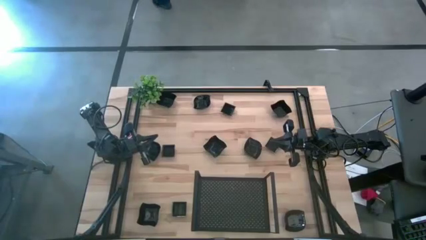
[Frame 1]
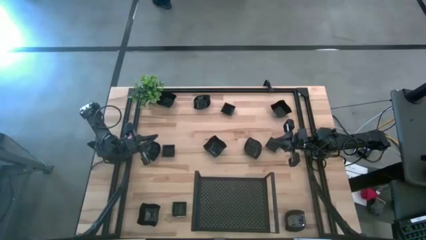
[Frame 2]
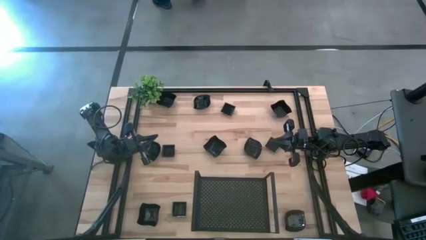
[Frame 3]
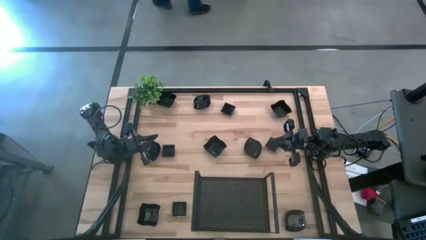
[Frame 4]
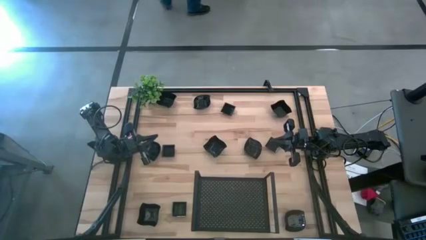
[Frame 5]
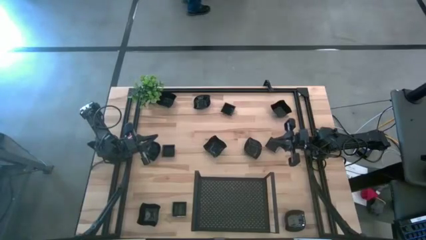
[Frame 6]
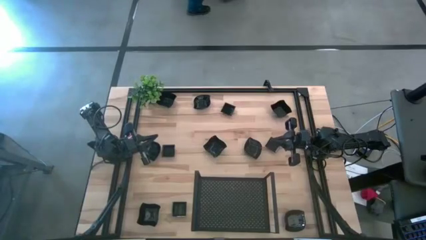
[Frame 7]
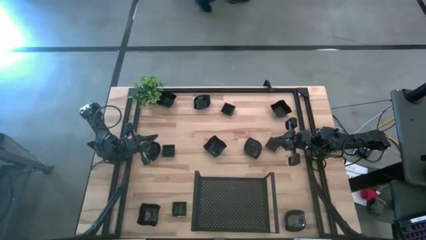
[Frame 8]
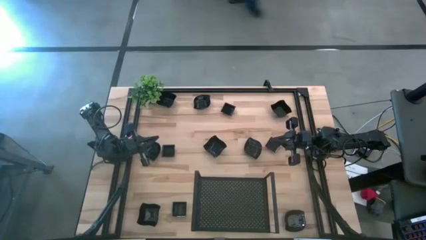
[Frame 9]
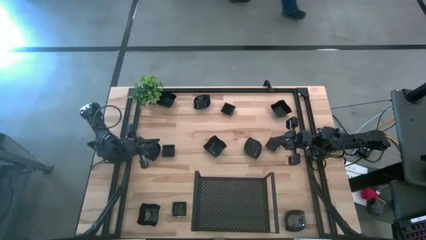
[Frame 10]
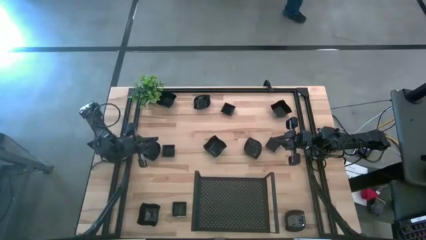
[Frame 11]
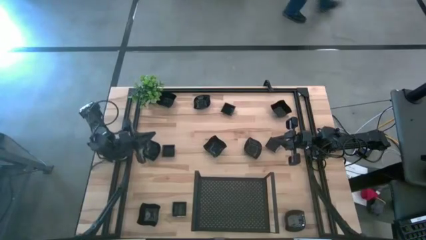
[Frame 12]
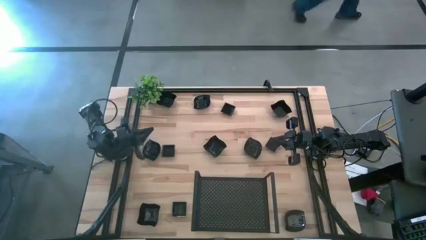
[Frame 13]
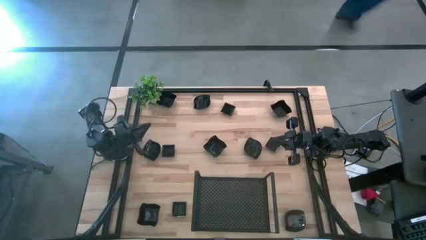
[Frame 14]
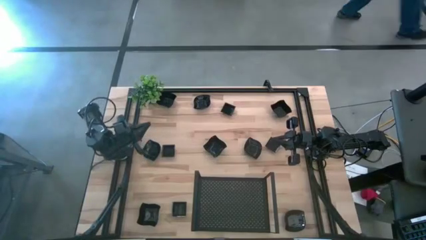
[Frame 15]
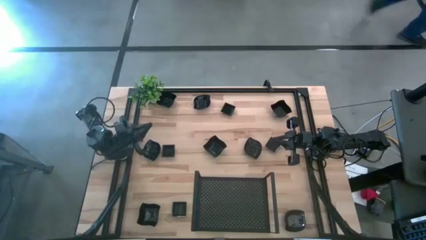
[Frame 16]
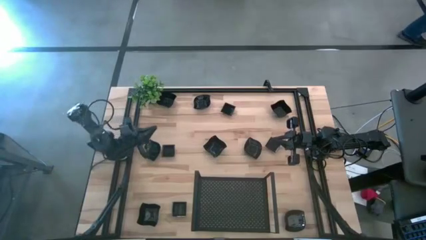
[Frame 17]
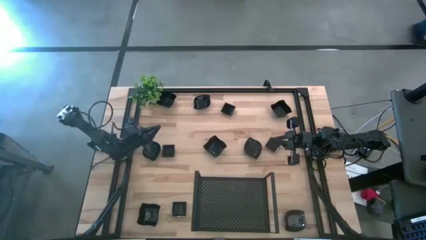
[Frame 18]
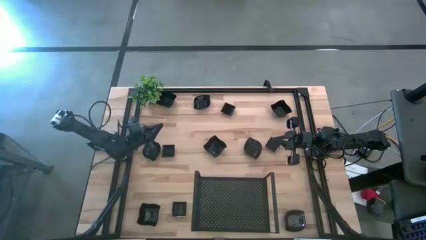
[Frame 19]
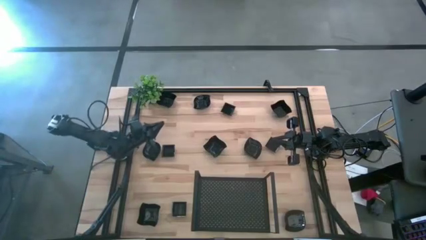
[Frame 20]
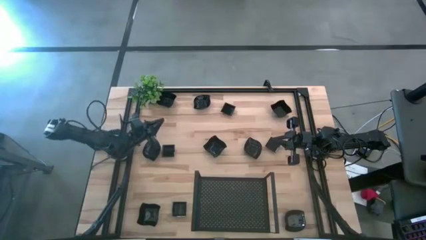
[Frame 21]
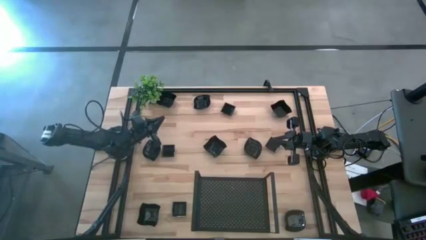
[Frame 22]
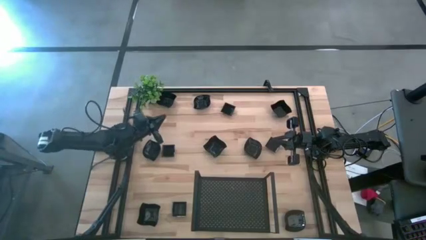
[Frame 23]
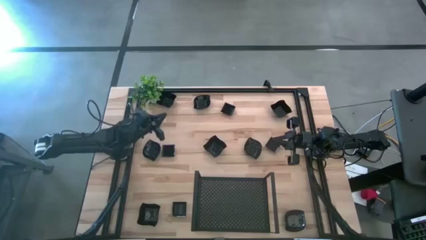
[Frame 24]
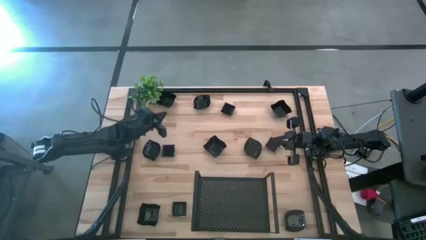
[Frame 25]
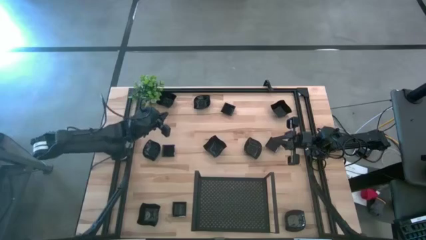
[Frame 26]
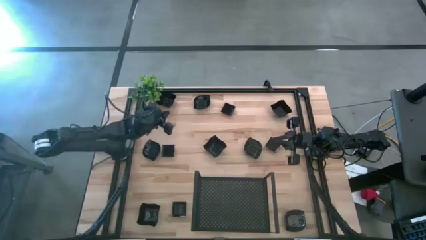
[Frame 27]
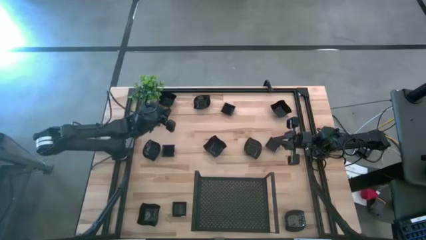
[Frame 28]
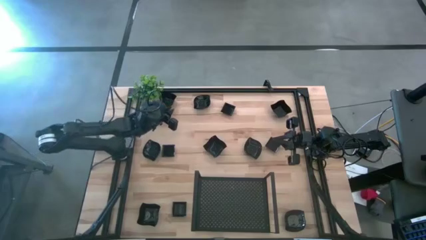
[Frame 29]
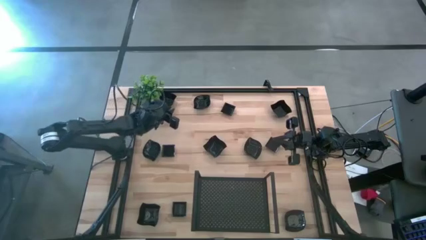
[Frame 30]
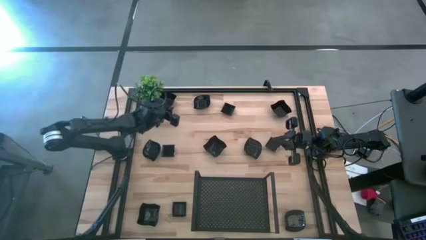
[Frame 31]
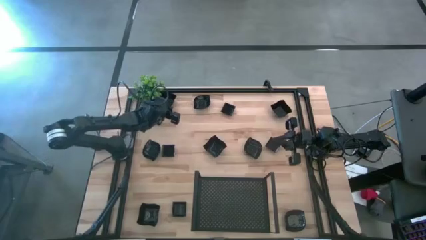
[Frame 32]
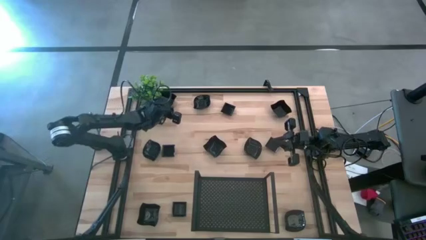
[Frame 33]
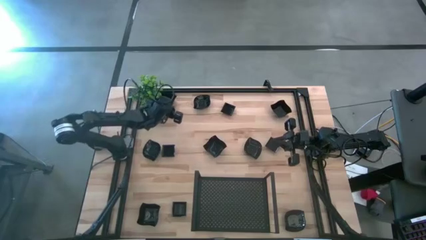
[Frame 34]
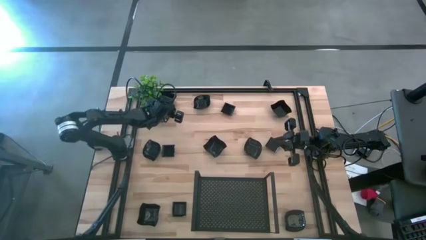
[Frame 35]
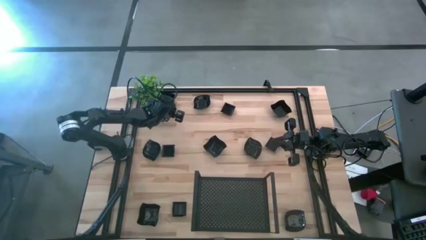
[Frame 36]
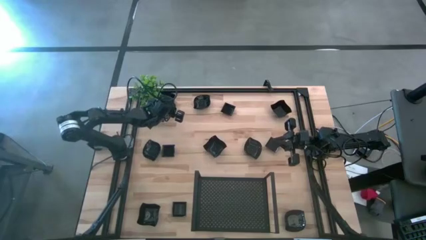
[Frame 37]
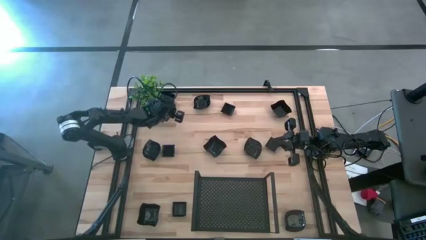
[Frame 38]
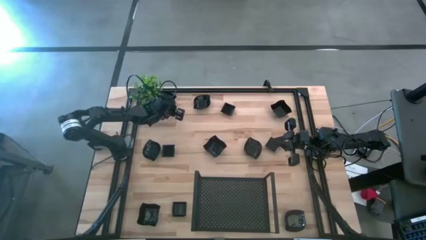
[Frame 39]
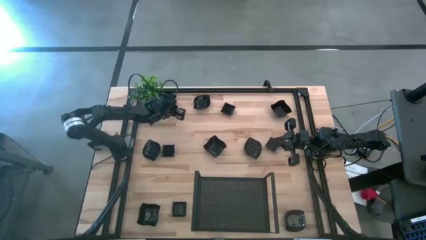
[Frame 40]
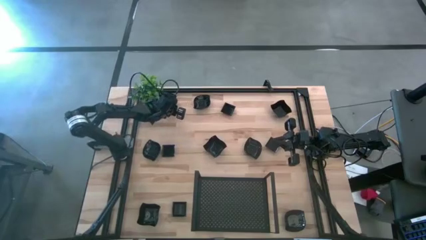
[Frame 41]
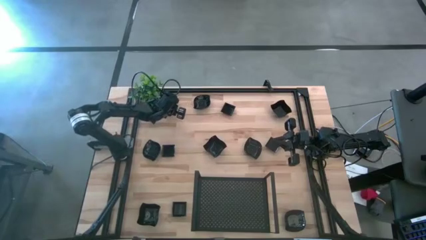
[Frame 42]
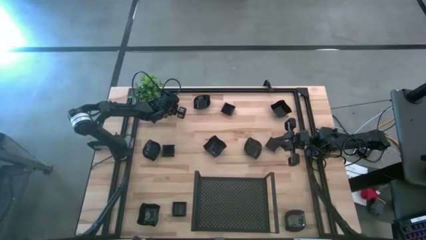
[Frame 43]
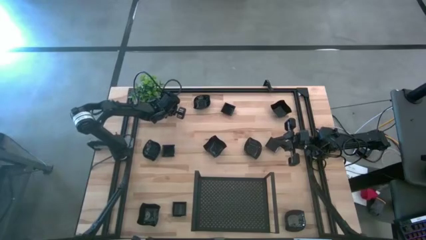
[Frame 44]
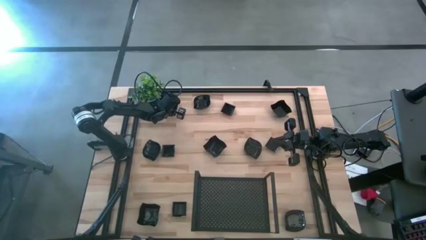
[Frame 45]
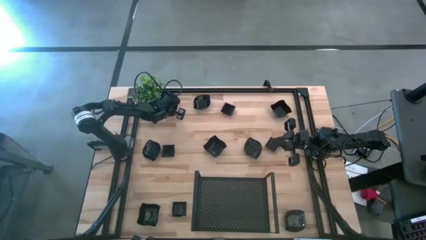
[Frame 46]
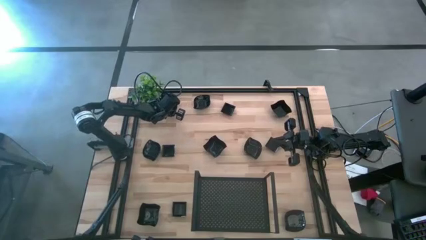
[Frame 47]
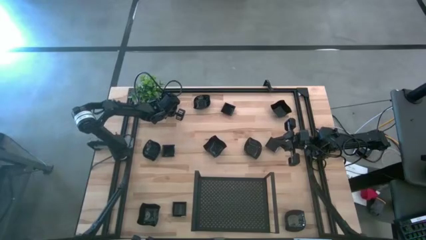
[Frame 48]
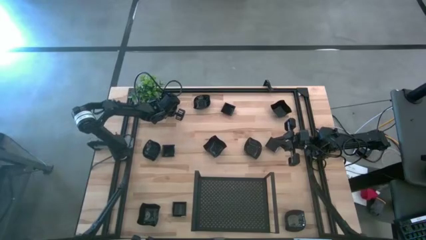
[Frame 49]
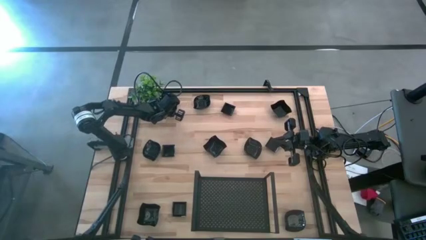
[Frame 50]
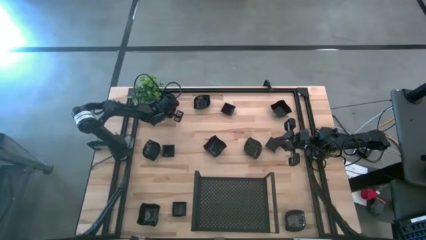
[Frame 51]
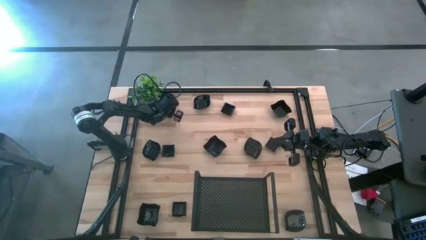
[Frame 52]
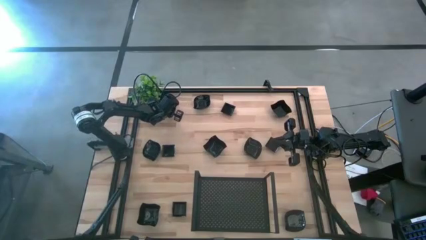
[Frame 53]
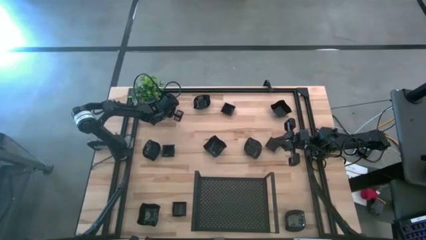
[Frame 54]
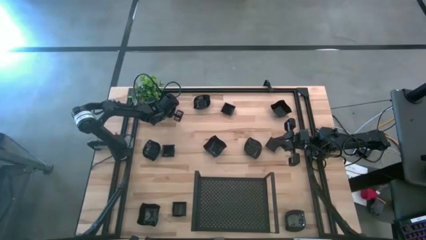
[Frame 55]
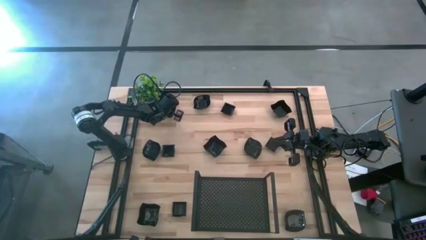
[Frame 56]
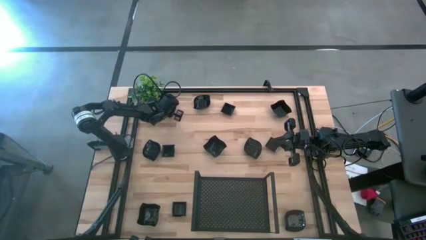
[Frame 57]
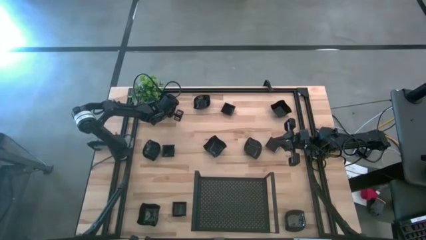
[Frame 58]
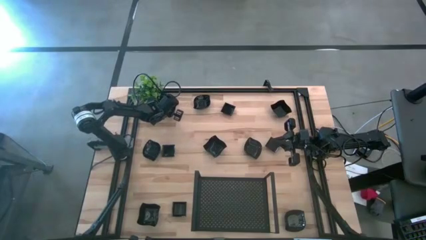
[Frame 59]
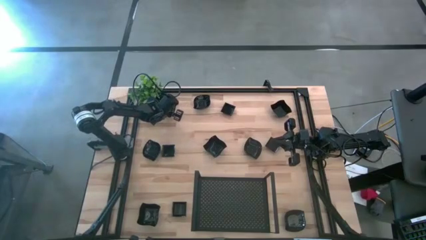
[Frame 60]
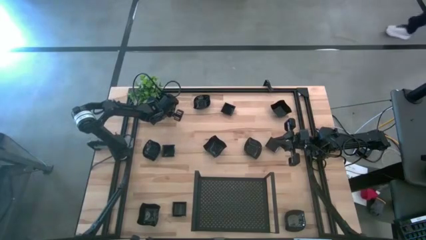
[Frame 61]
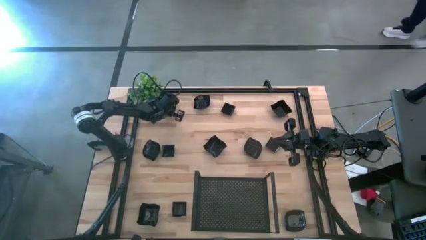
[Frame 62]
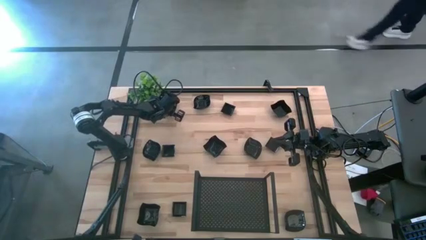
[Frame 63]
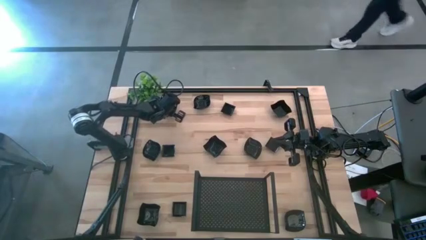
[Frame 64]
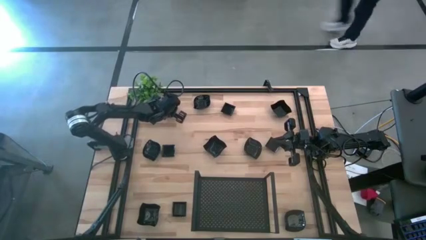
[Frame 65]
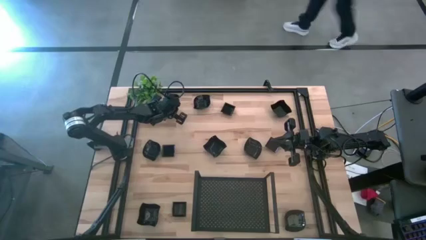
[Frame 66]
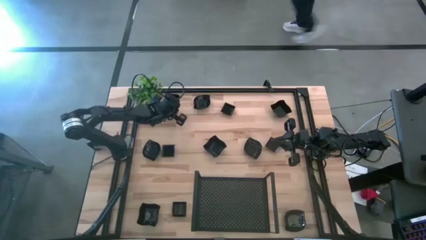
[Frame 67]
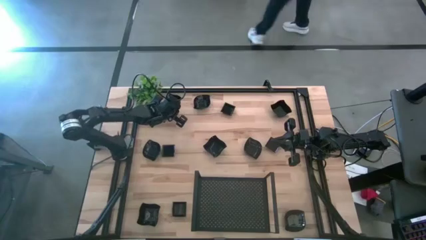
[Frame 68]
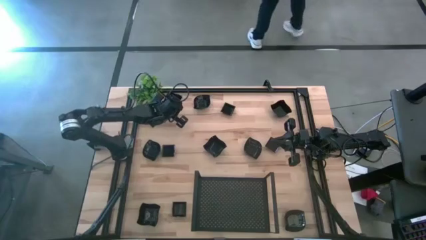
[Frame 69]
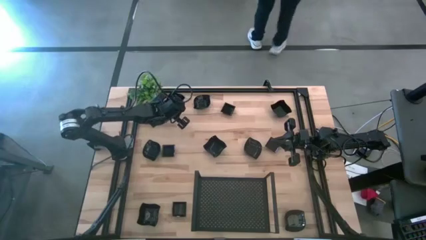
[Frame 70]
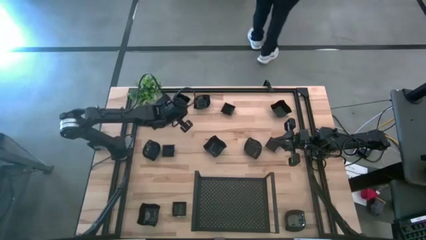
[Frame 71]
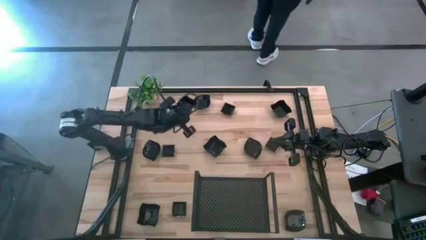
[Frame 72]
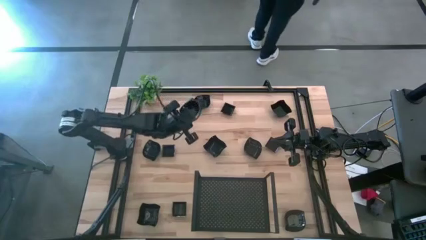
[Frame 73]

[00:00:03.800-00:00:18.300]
Task: Pick & Place Mini shaped plates
Put the distorted square plate on the shelf
